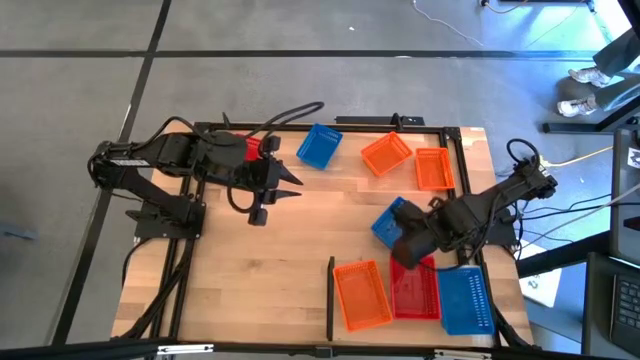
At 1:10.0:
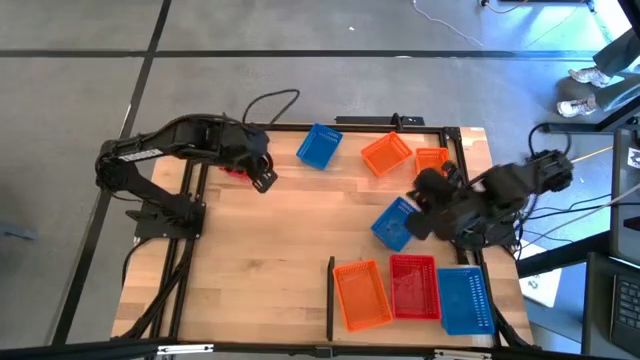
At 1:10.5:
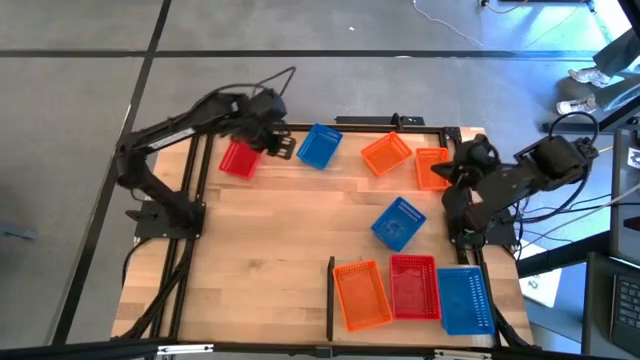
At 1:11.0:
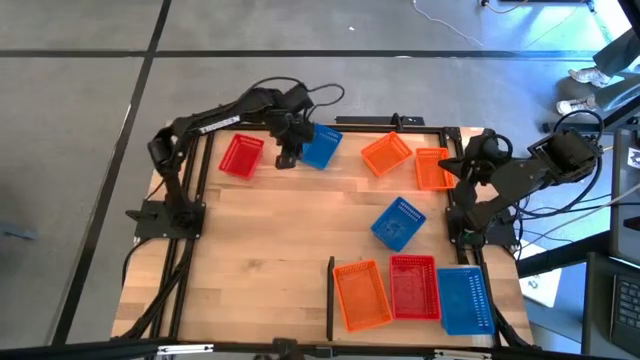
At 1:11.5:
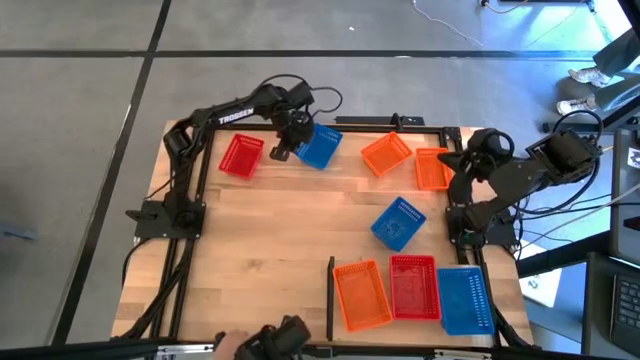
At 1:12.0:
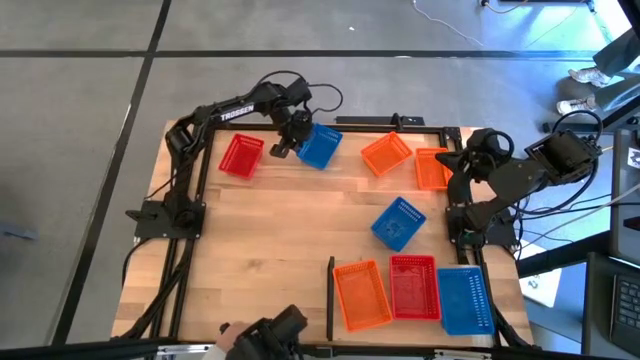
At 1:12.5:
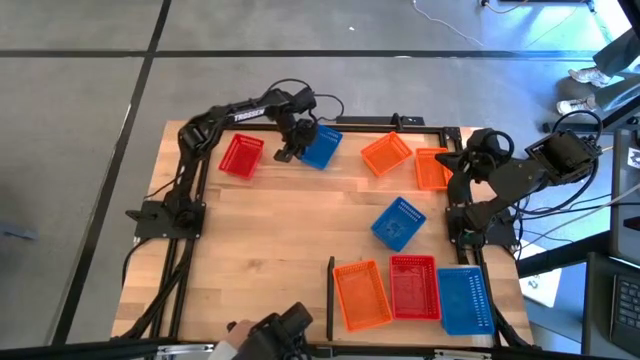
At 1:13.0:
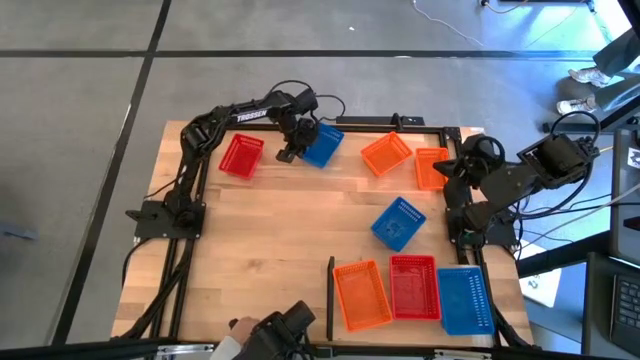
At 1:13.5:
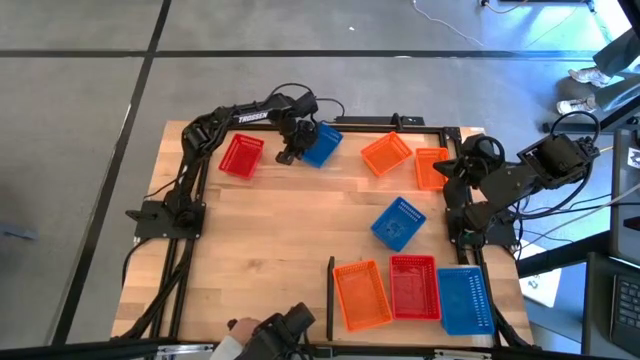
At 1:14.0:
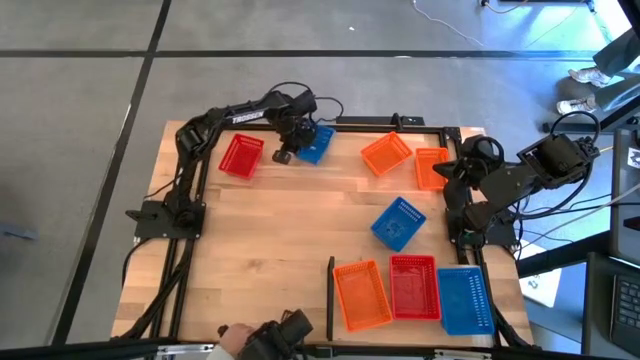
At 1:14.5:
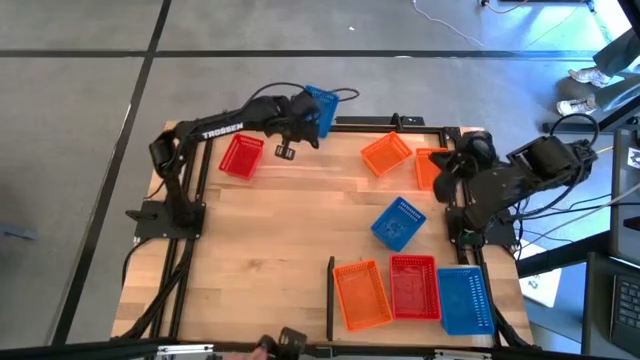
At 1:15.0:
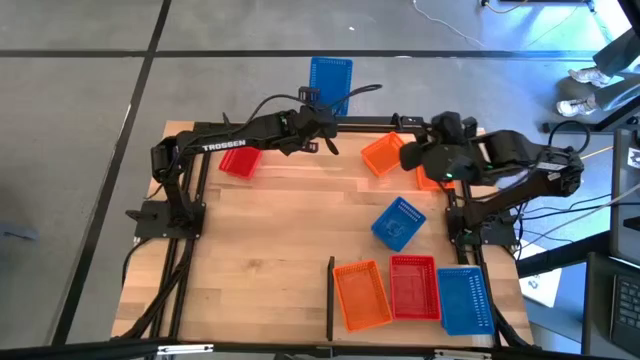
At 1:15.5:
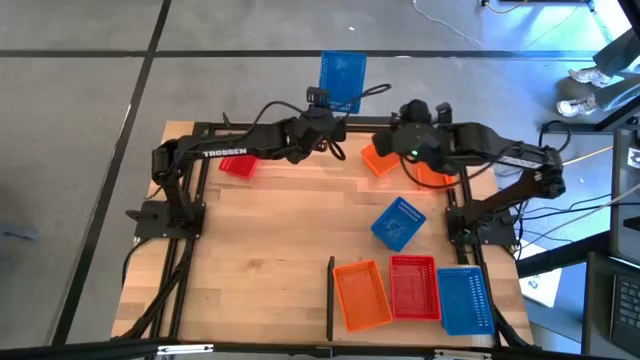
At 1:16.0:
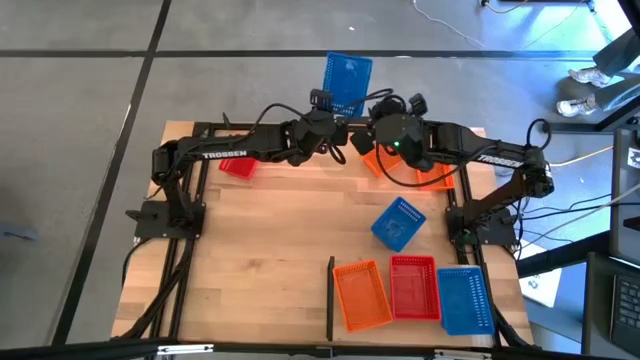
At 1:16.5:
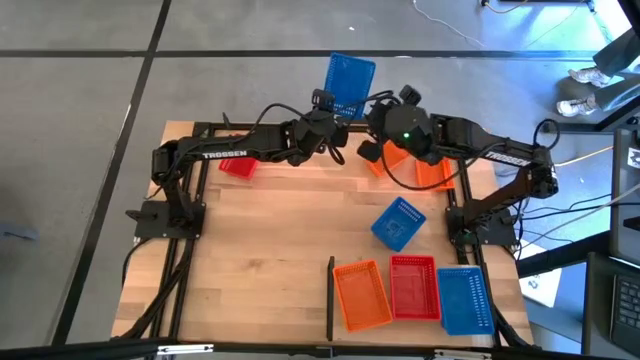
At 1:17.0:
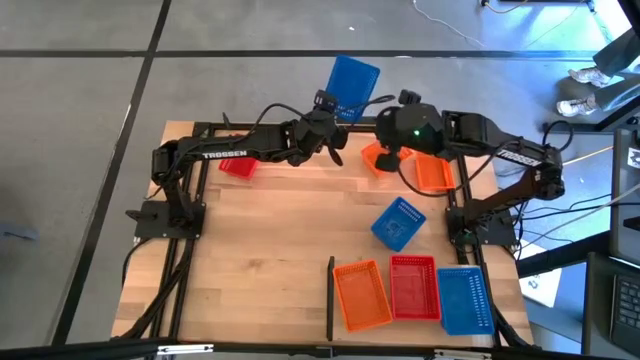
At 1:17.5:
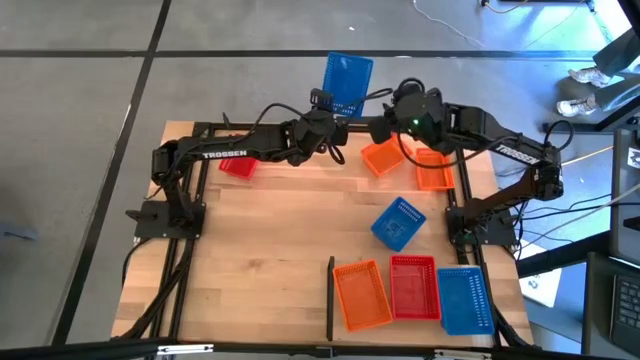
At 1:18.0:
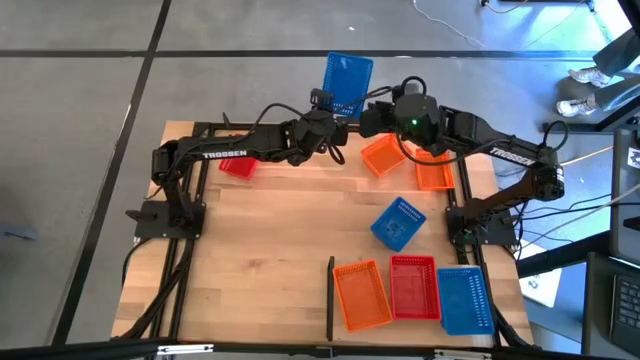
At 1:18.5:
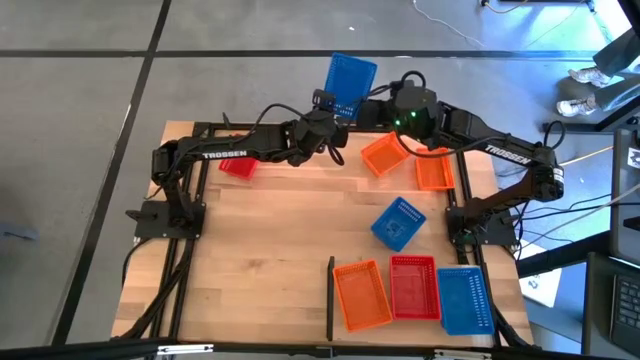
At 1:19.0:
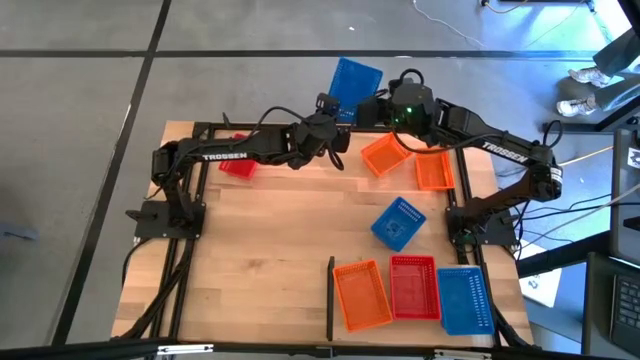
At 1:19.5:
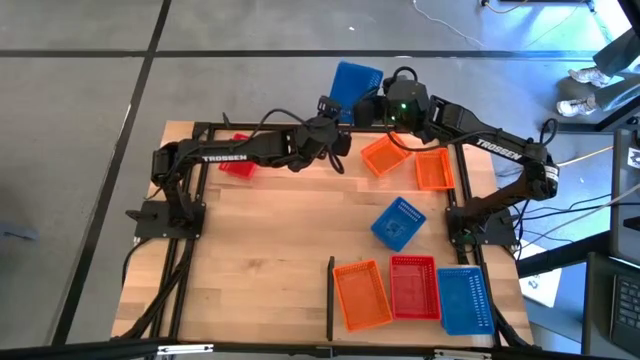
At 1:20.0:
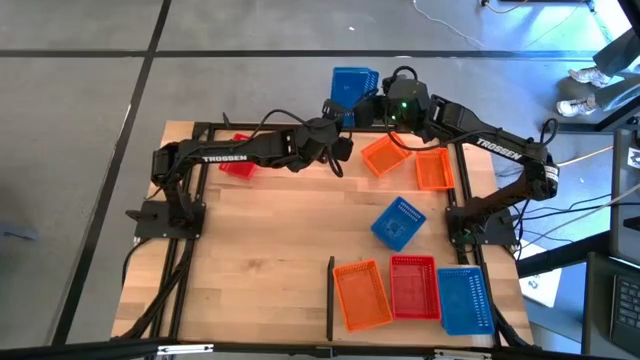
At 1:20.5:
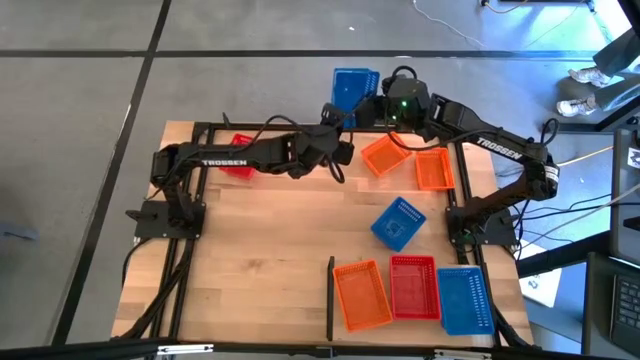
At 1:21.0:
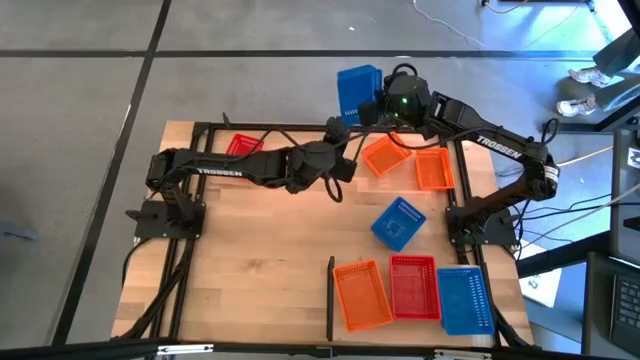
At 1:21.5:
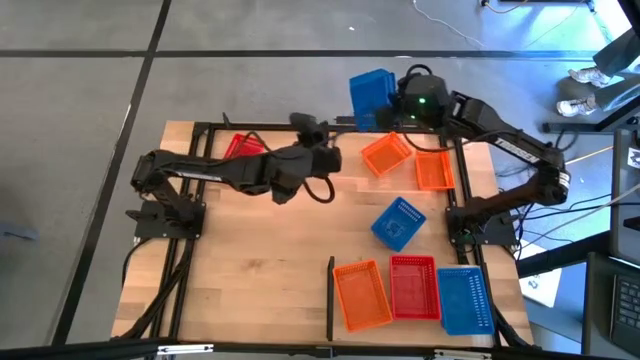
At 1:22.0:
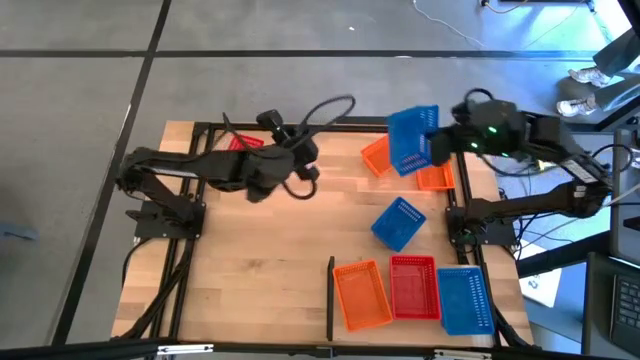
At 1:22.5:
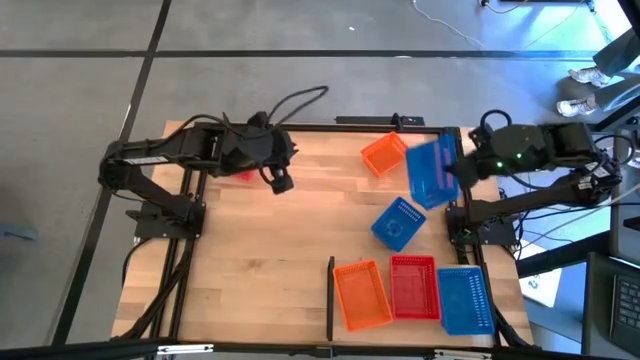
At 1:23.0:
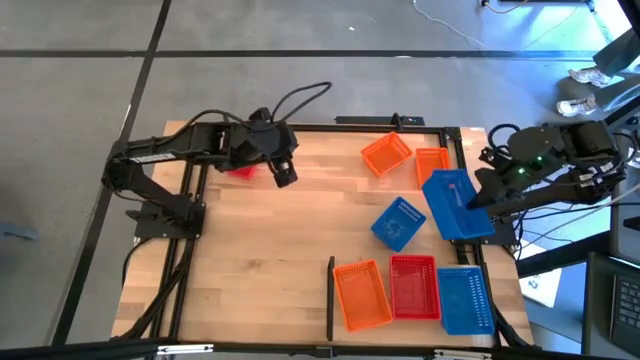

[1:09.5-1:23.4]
Task: Stack baskets on shelf by color
Stack the top blue basket on top of the blue basket on the shelf

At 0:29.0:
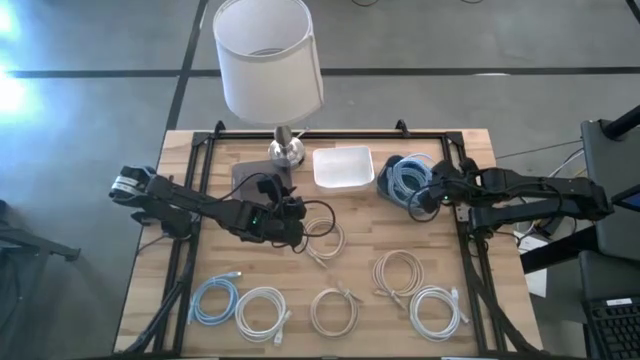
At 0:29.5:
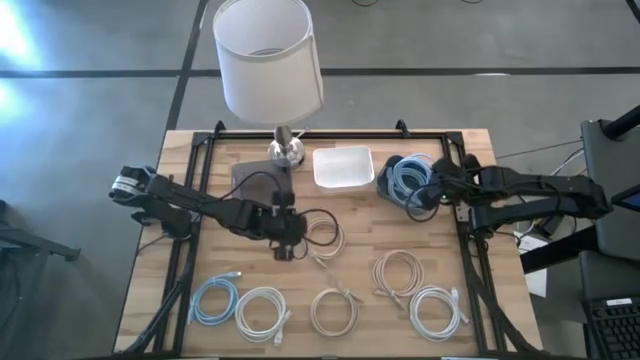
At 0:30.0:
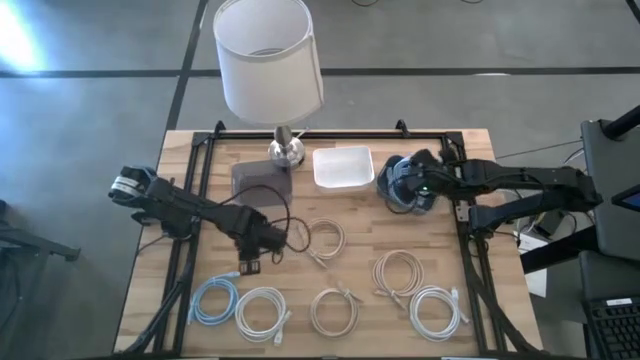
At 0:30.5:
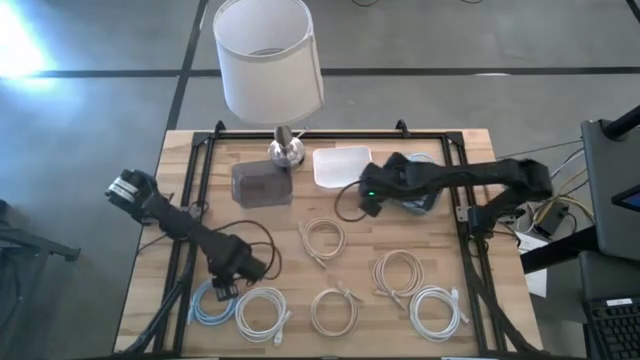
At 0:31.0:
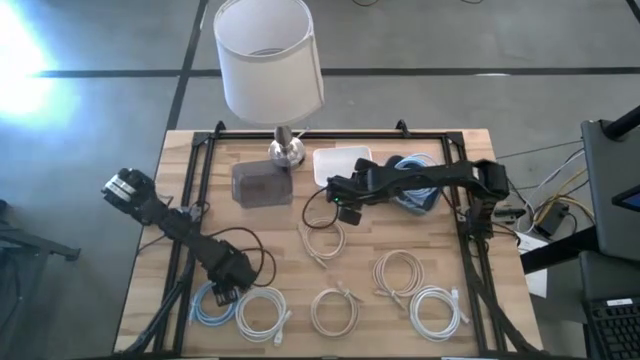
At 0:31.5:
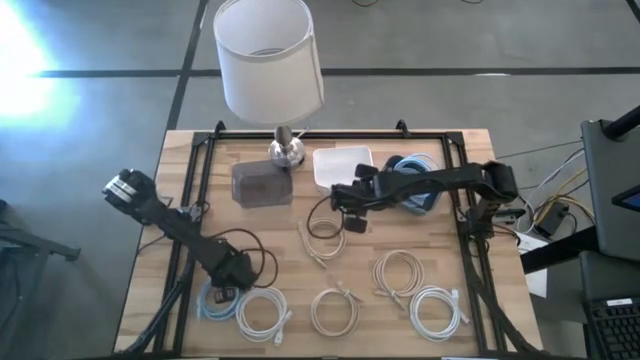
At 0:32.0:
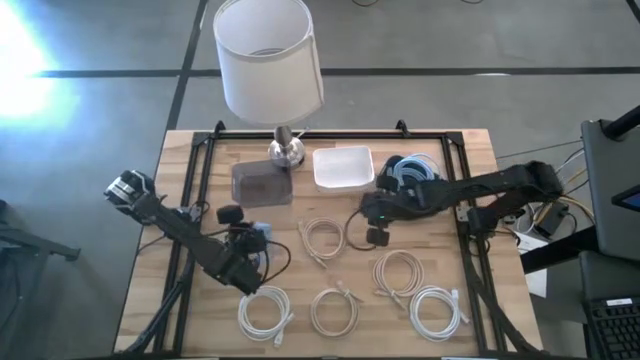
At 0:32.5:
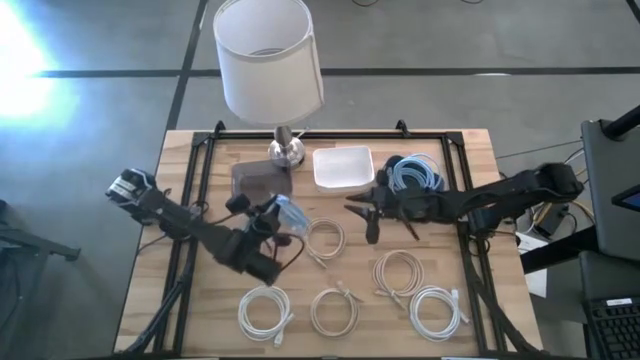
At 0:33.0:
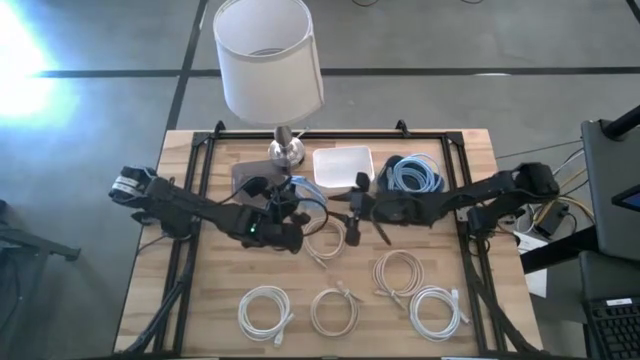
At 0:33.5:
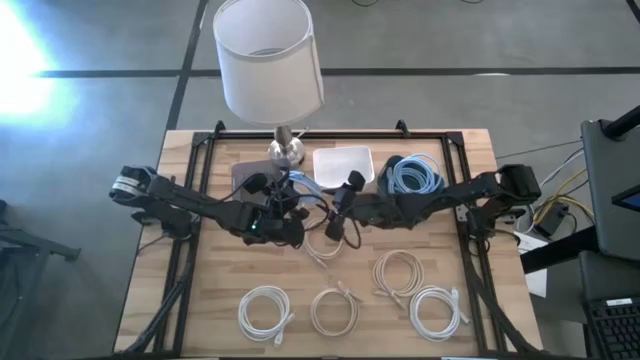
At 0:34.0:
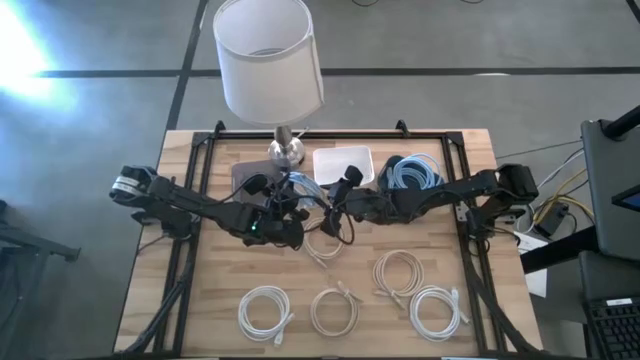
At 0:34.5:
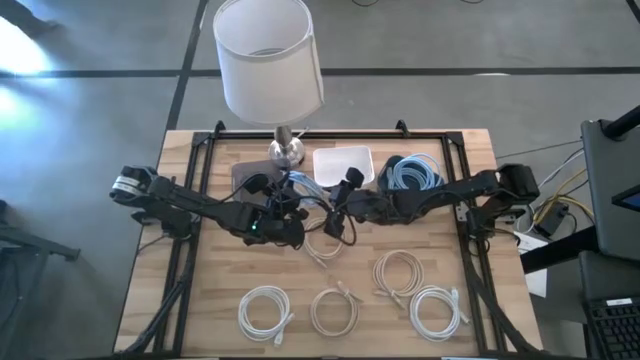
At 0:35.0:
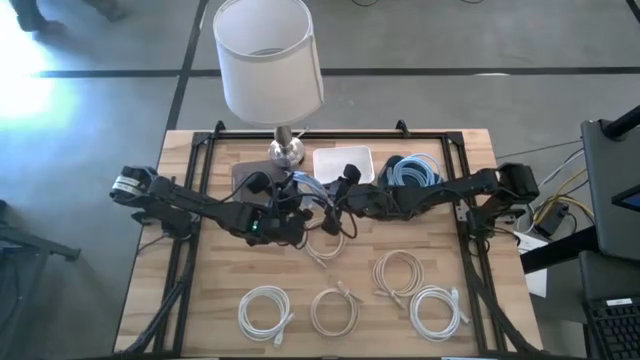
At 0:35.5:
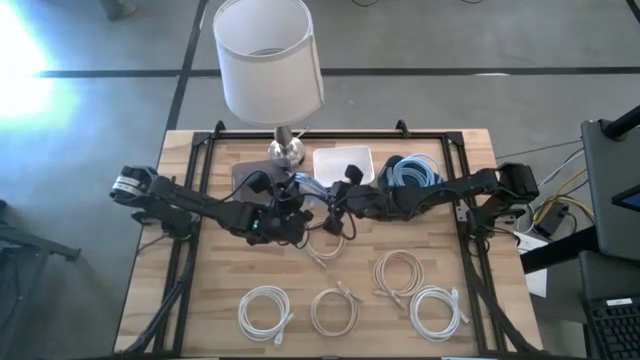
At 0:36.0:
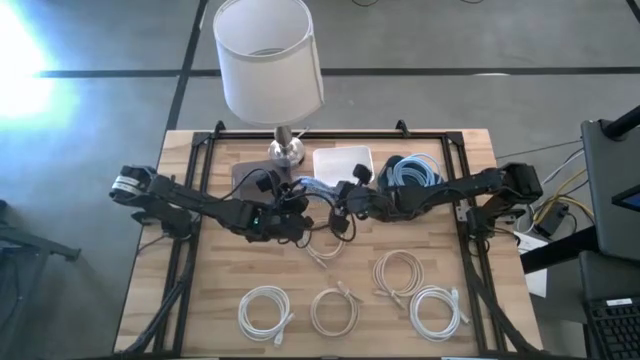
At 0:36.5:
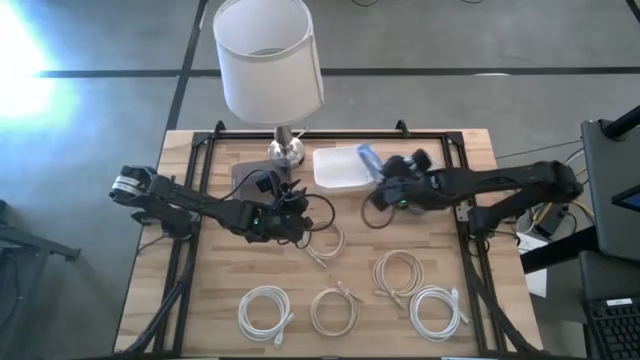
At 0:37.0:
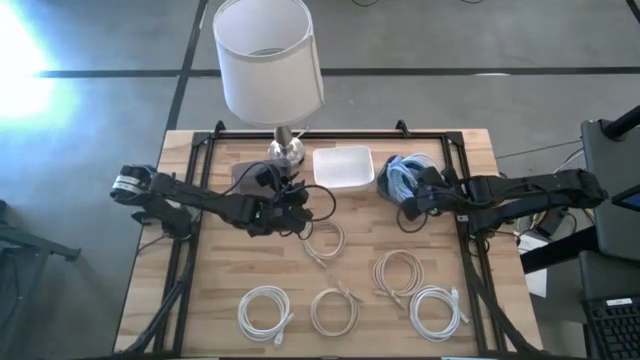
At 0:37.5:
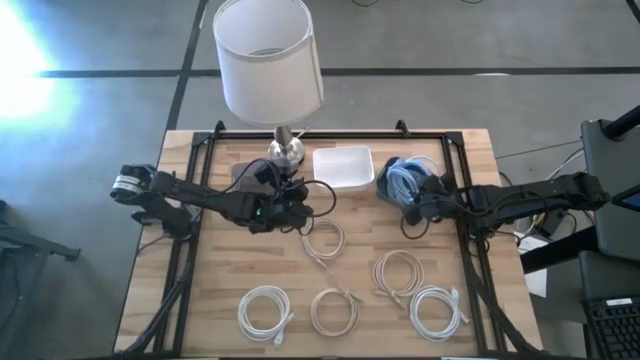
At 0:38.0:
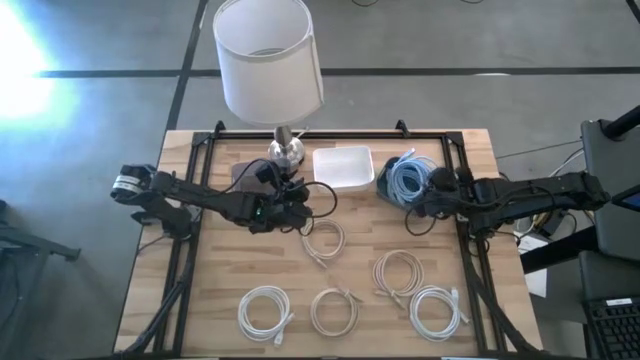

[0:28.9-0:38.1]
Task: Sort HDMI cables
Put the blue hdmi cable into the blue bin
